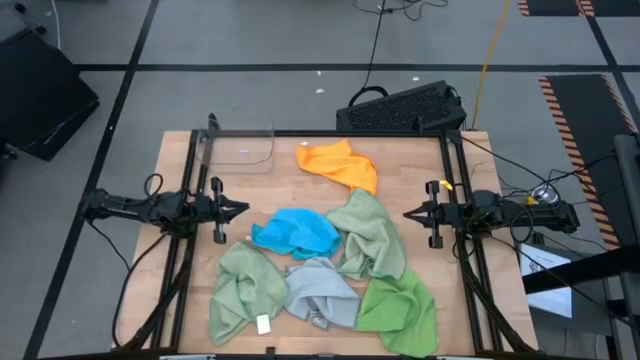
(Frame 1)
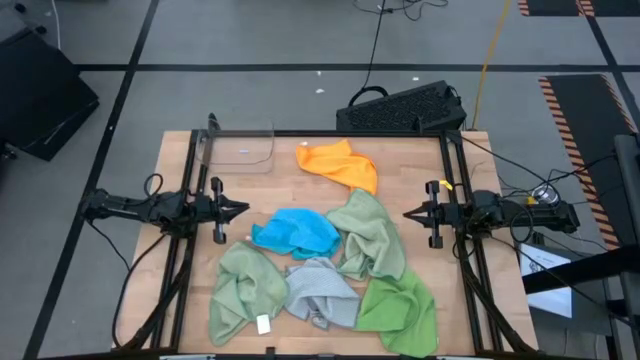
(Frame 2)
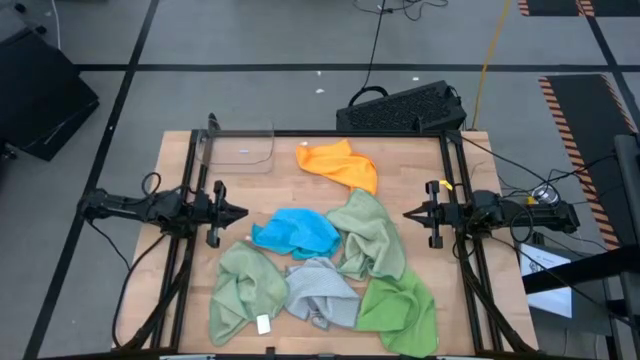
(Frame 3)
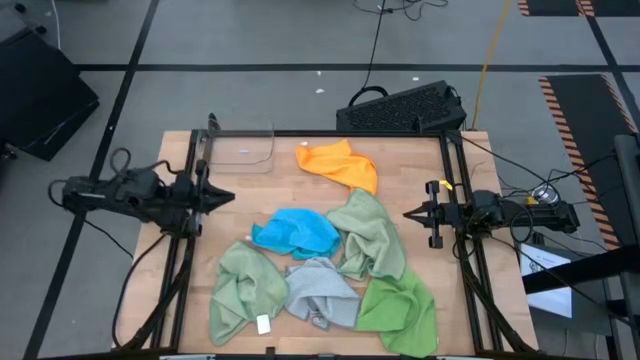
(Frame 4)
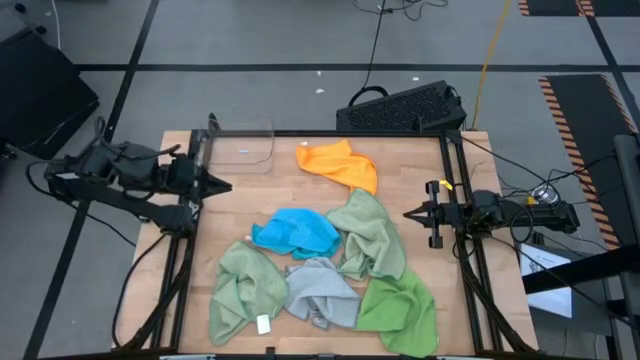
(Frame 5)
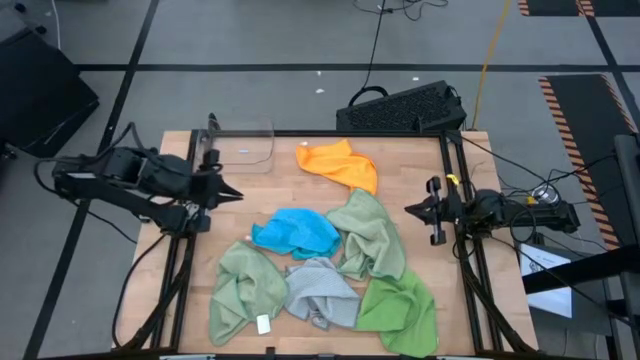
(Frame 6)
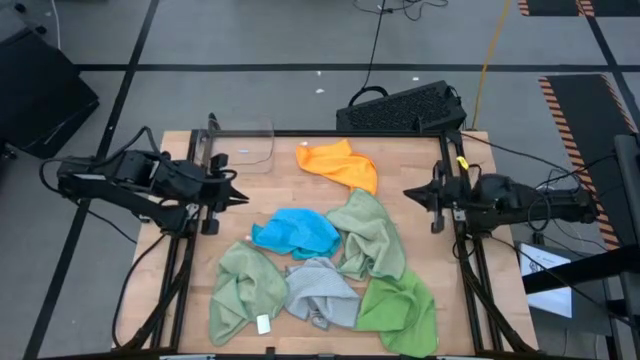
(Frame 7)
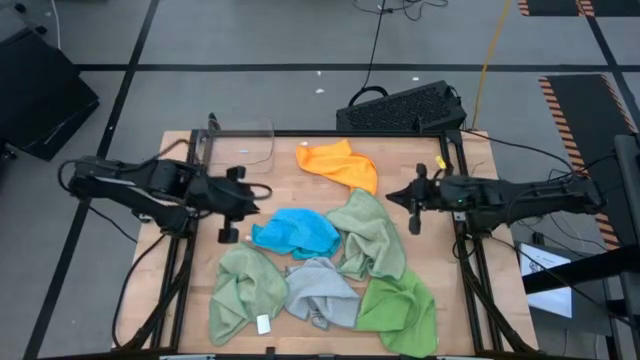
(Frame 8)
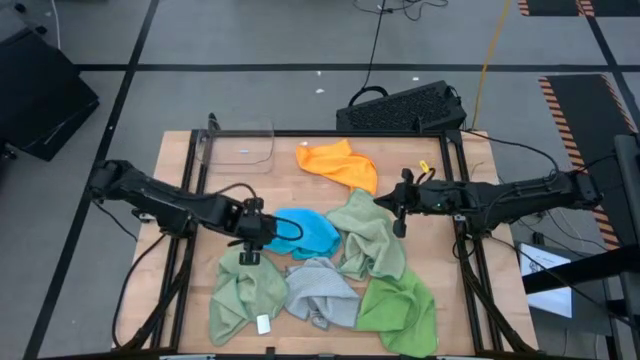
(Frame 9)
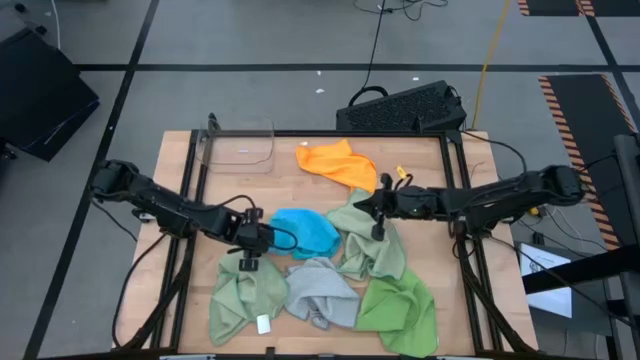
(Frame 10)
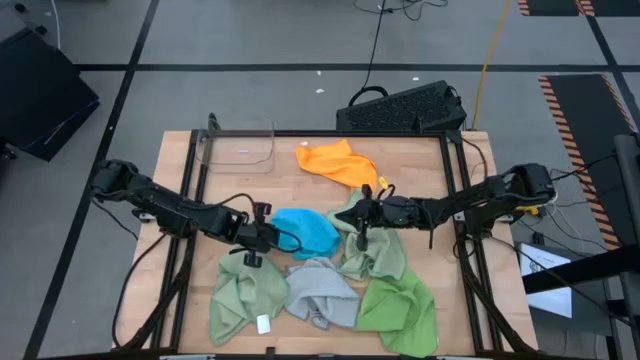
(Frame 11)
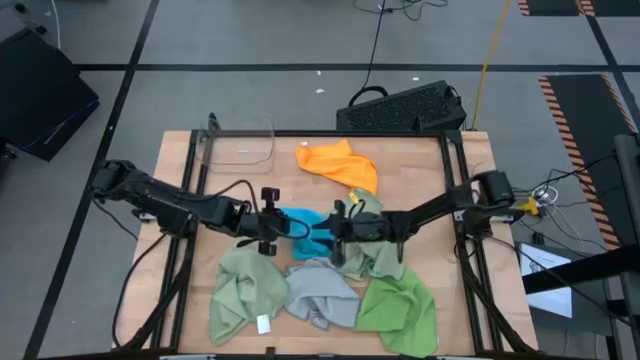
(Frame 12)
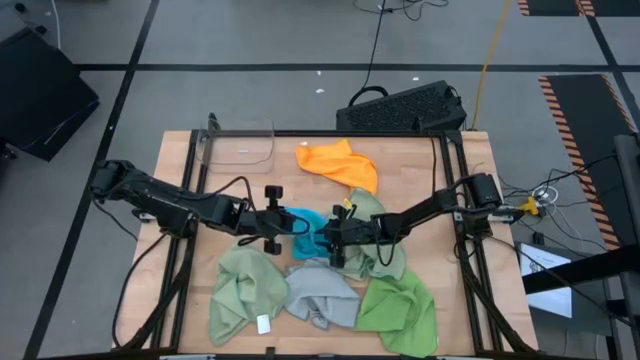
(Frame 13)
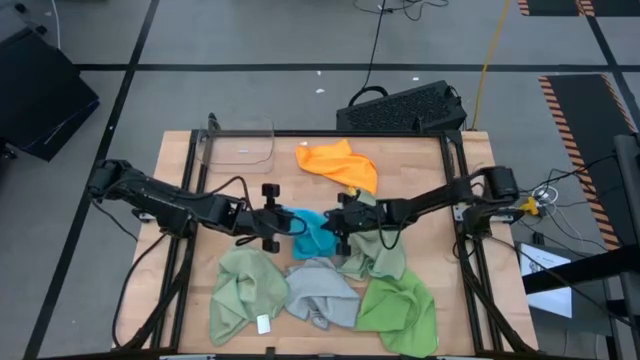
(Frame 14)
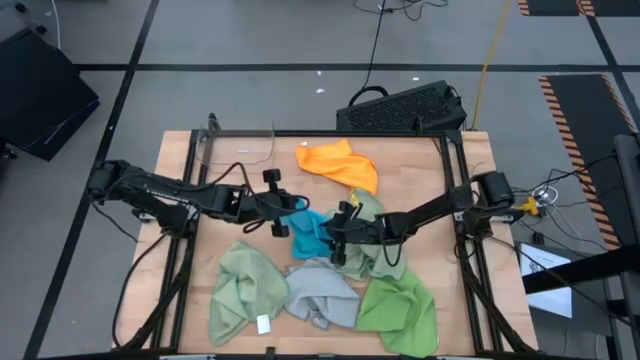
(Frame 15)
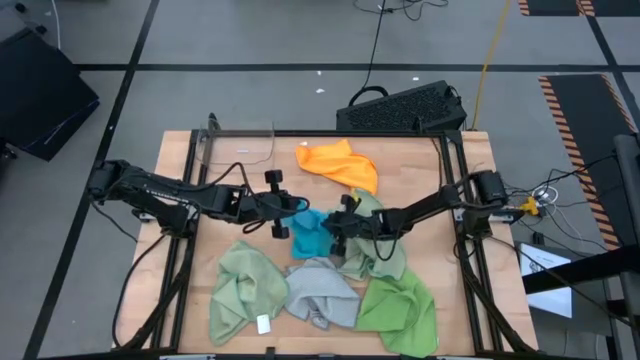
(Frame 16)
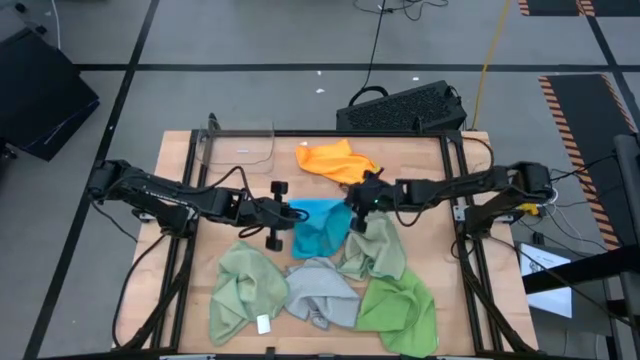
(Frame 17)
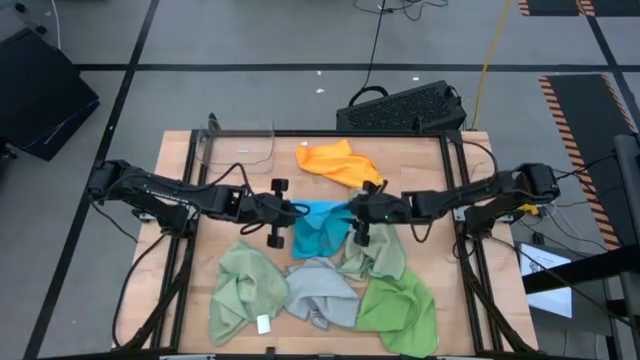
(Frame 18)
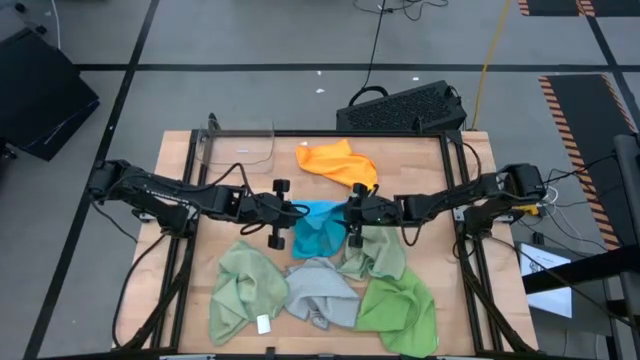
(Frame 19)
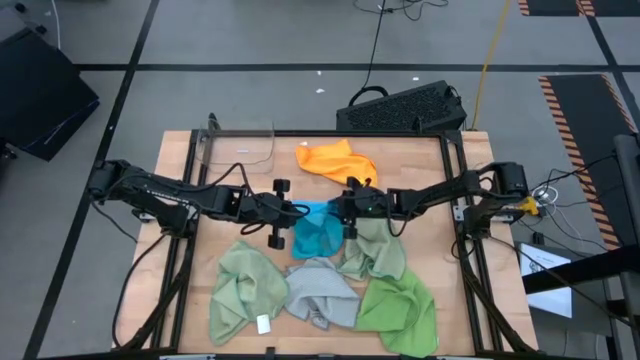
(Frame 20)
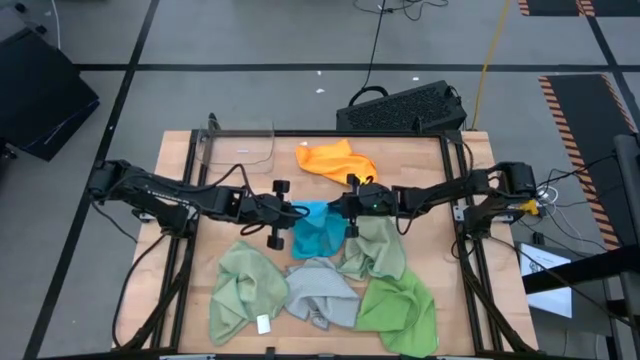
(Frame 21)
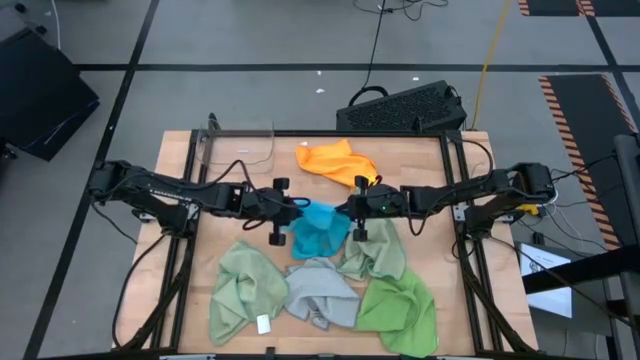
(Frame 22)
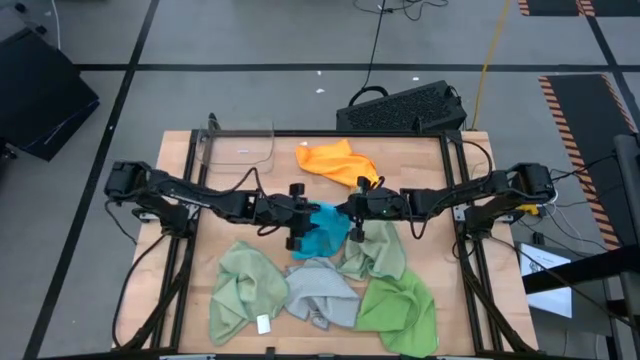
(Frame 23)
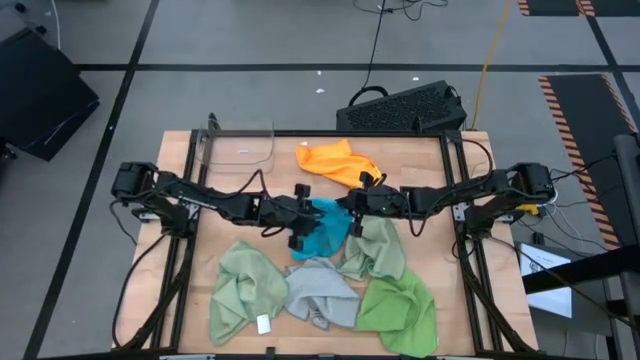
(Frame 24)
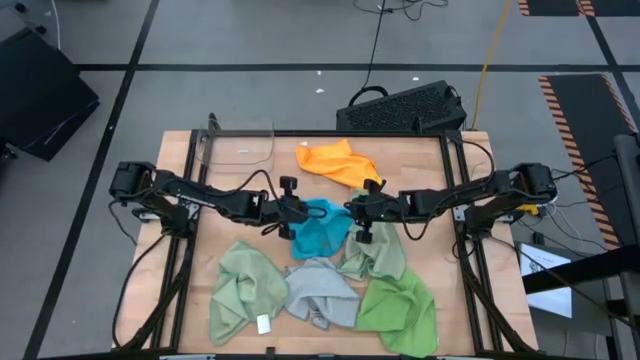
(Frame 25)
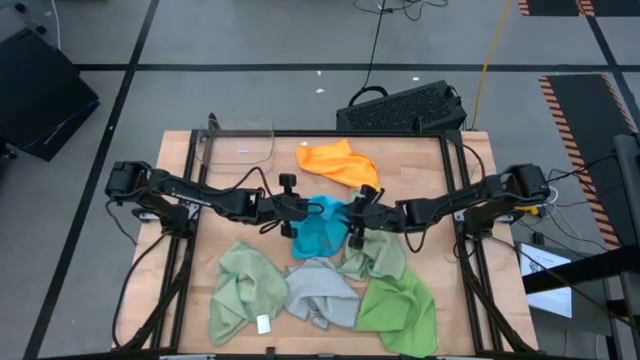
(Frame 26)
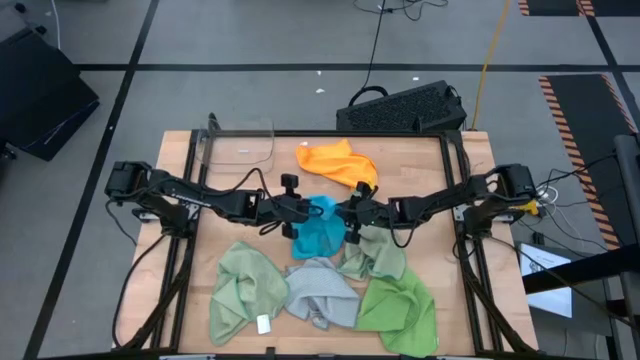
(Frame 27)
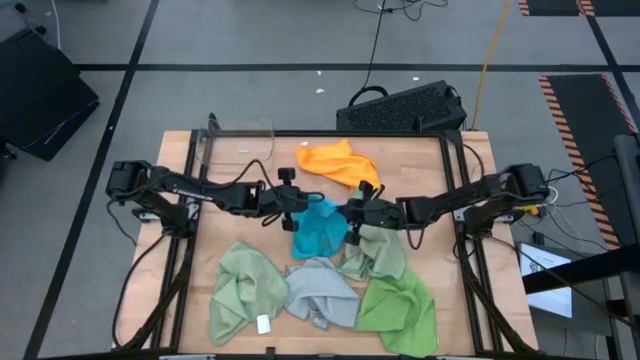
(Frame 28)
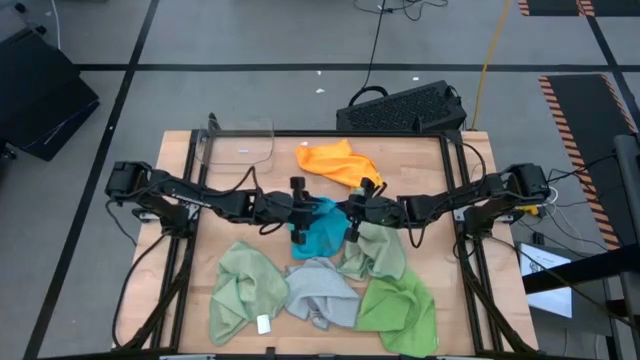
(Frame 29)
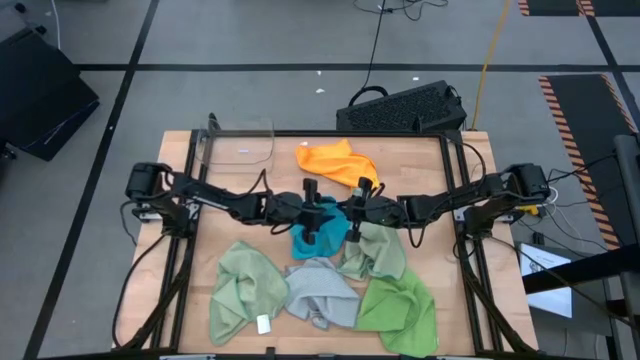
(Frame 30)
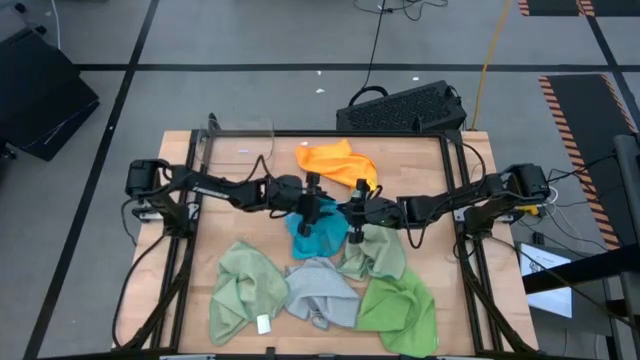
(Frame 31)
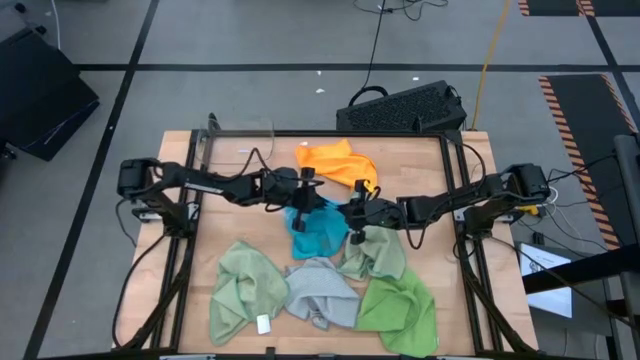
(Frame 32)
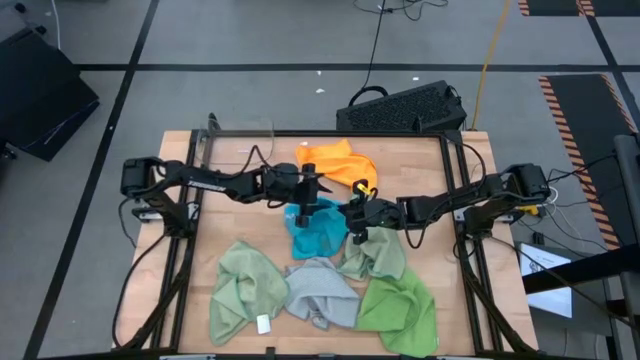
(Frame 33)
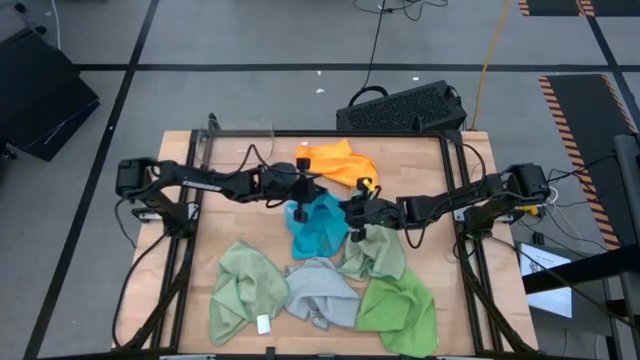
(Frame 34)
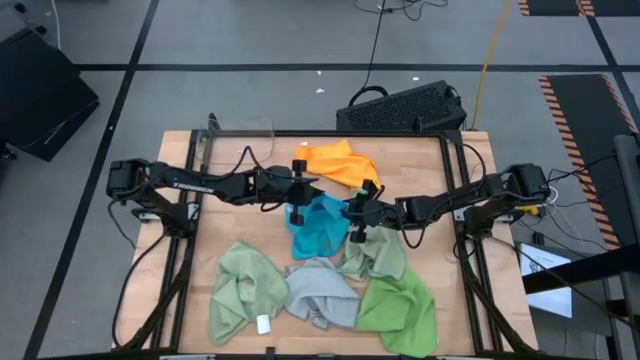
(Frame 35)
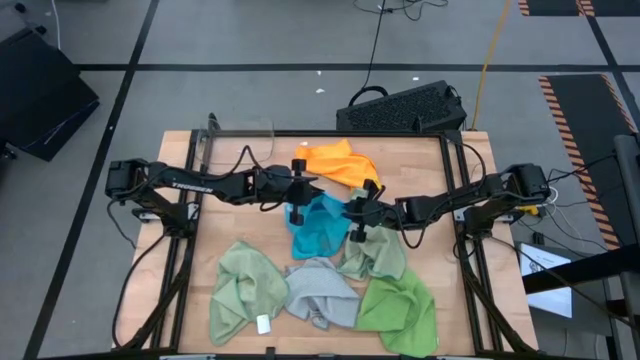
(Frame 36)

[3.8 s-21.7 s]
Task: Fold microfiber towels
Fold the blue microfiber cloth
